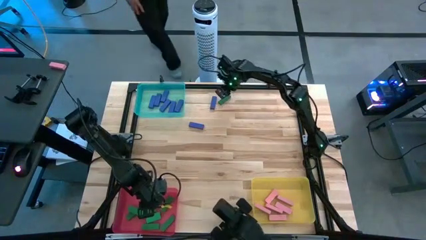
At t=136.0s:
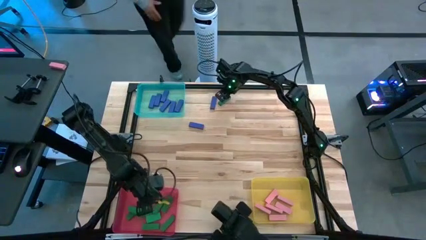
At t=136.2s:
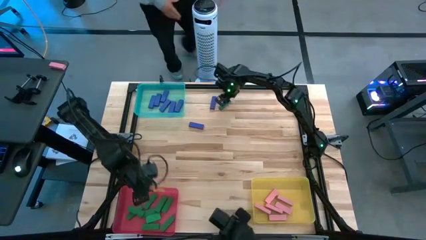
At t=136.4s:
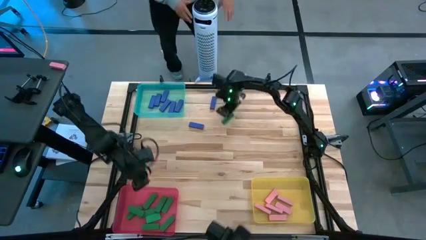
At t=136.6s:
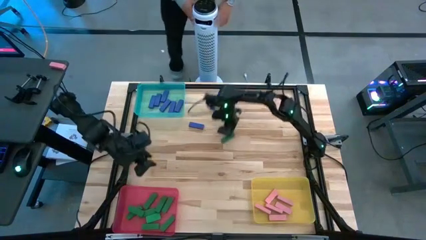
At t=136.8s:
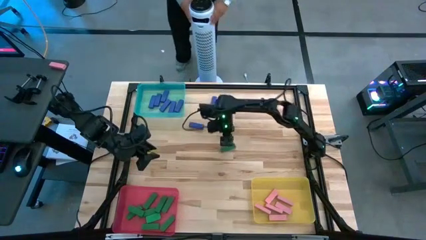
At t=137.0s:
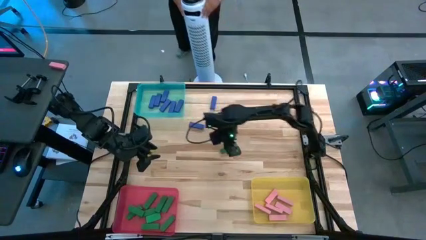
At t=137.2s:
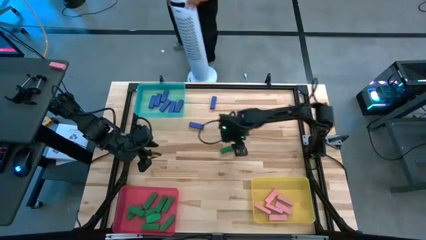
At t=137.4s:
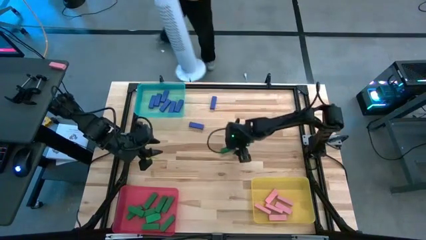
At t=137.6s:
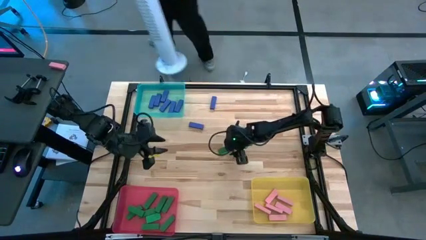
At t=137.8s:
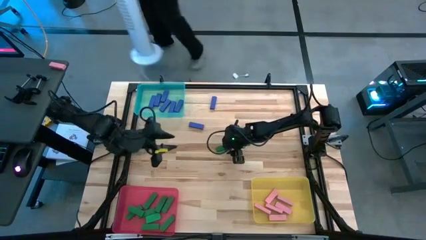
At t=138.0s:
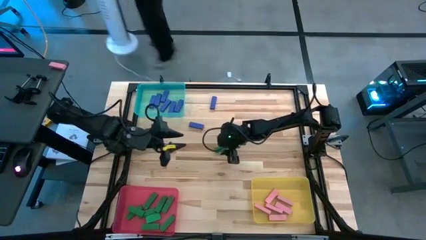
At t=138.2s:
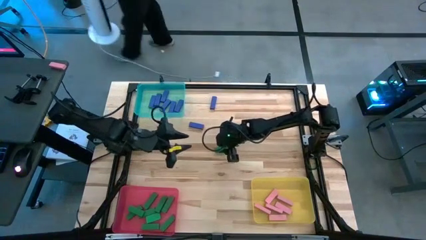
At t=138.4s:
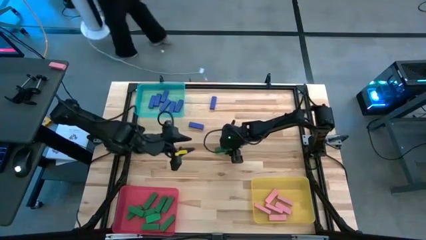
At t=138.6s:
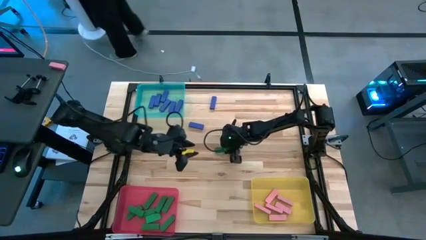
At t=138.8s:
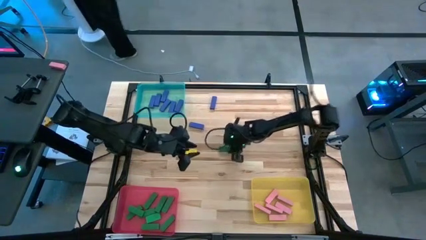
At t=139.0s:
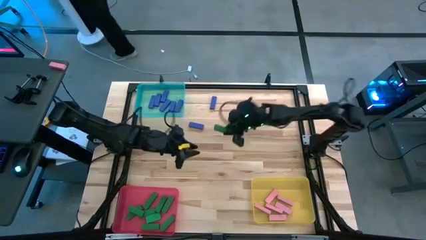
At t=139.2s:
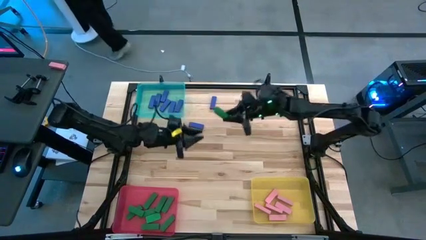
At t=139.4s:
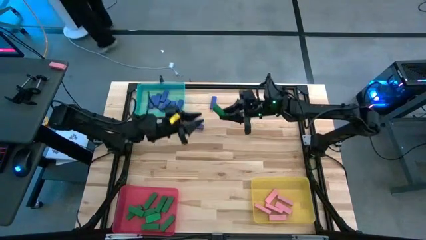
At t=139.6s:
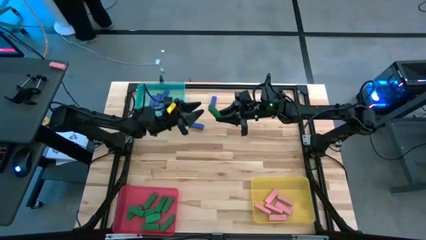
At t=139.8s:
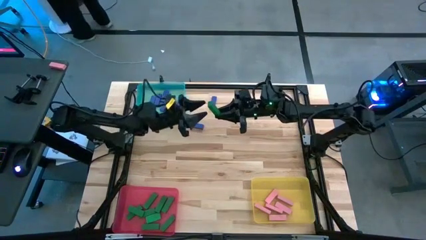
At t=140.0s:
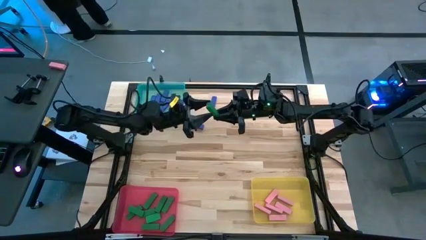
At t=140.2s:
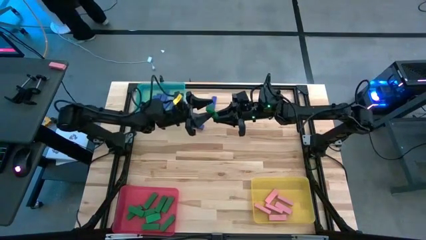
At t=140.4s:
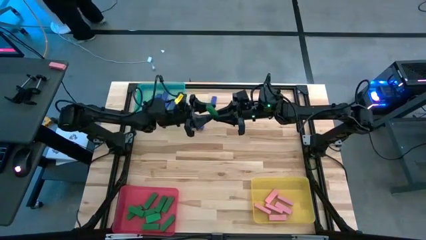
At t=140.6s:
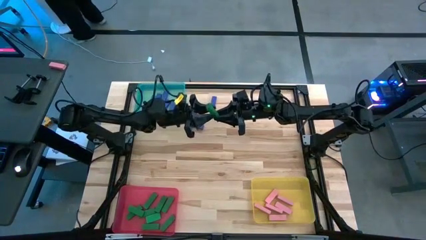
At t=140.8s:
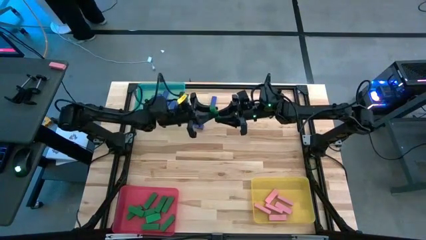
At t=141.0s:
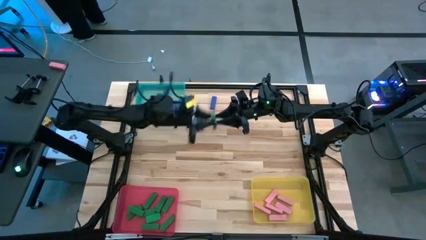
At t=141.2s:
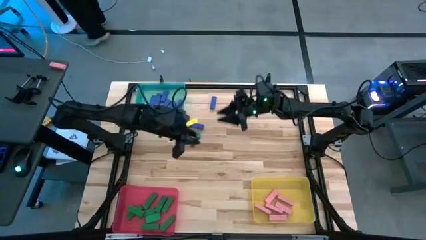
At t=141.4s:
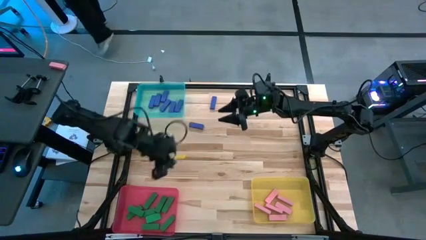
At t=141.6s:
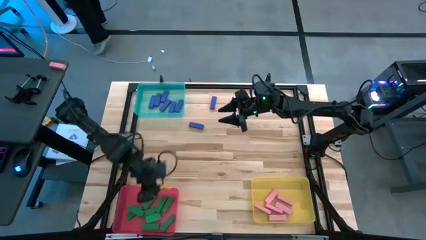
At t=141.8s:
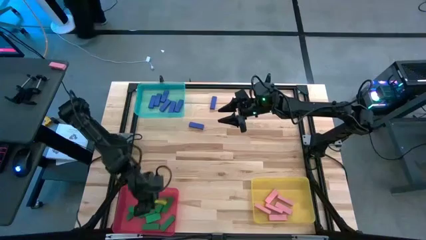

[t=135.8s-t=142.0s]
Task: Sort blocks
Put the green block into the red bin

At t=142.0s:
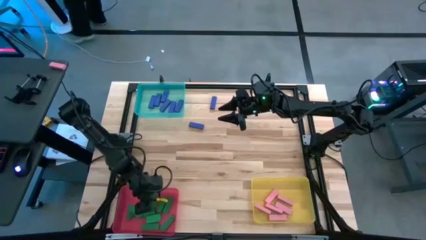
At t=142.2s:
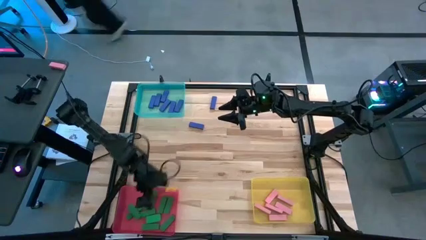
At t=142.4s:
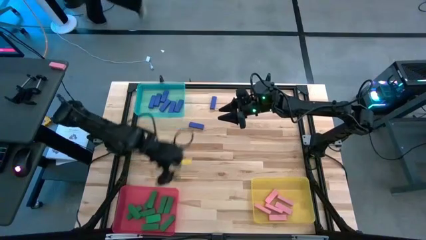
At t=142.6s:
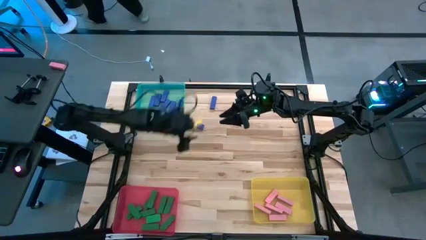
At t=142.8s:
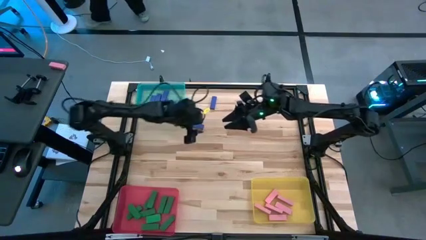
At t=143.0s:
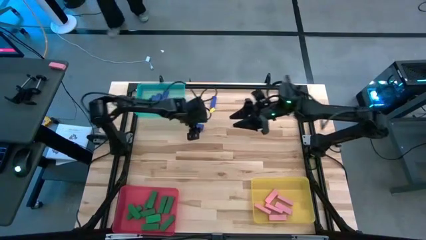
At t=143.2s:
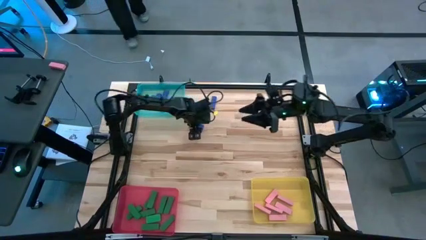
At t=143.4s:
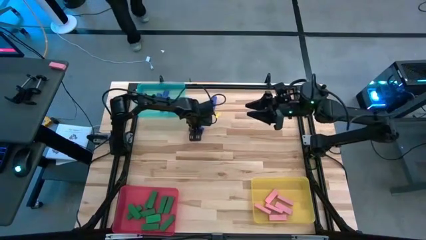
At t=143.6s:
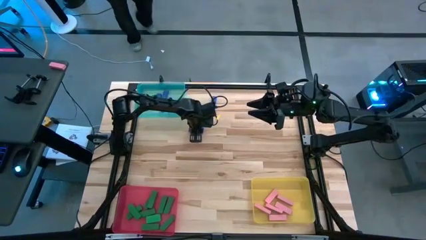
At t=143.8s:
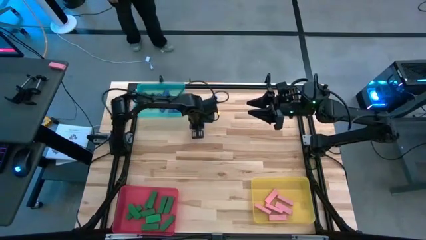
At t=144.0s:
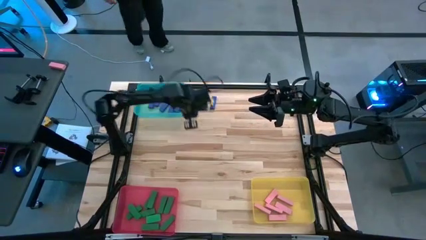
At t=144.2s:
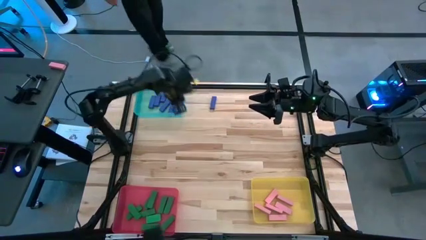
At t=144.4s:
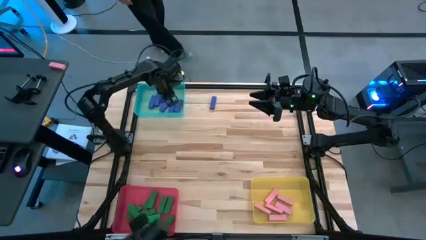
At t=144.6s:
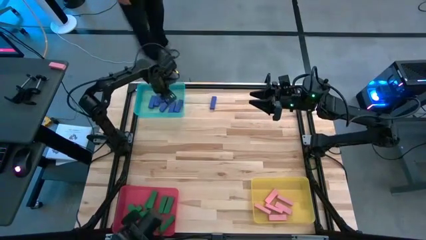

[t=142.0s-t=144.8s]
Put the blue block into the blue bin

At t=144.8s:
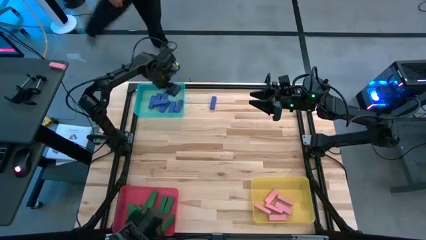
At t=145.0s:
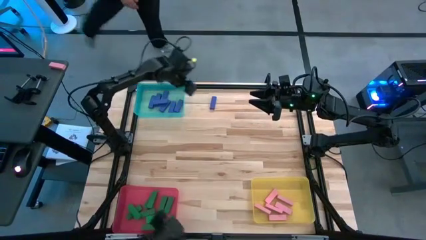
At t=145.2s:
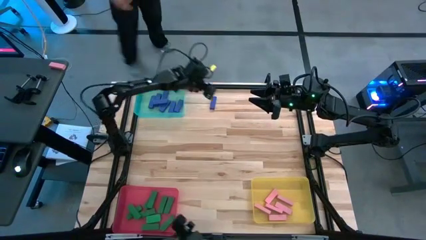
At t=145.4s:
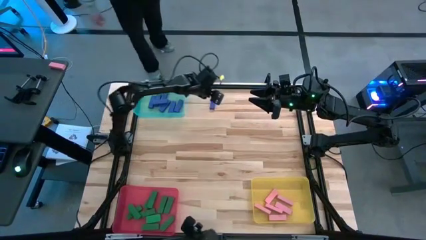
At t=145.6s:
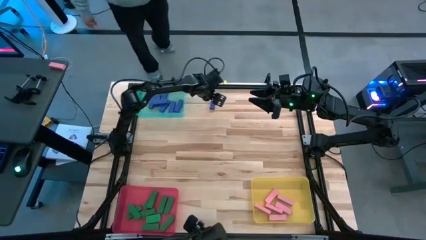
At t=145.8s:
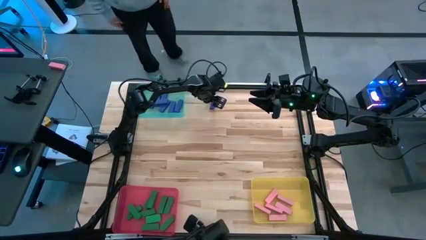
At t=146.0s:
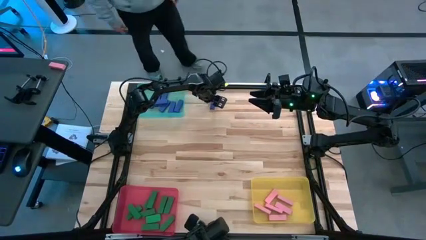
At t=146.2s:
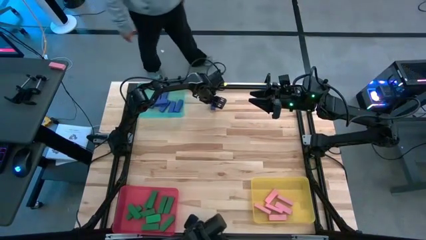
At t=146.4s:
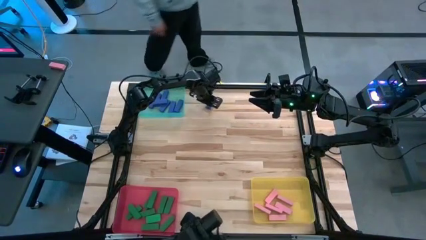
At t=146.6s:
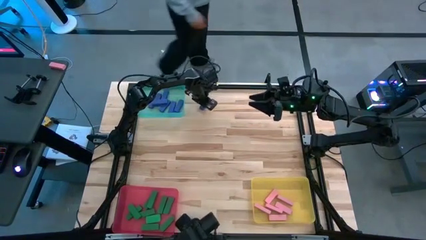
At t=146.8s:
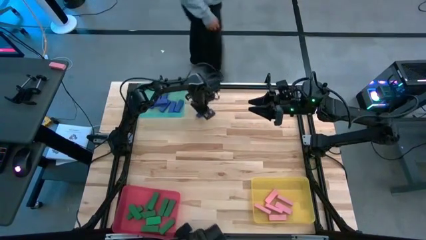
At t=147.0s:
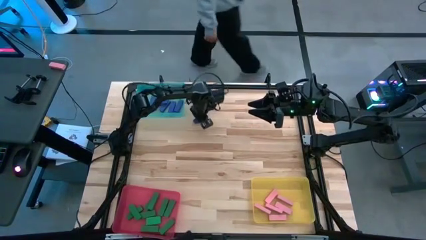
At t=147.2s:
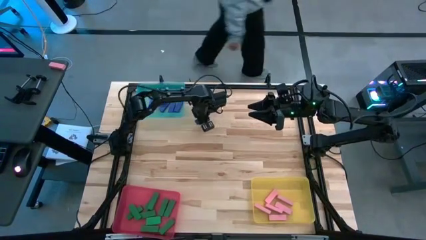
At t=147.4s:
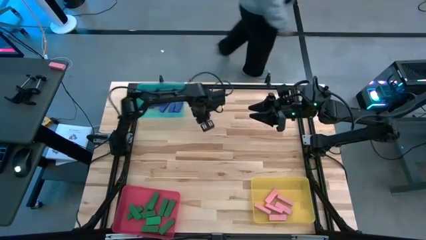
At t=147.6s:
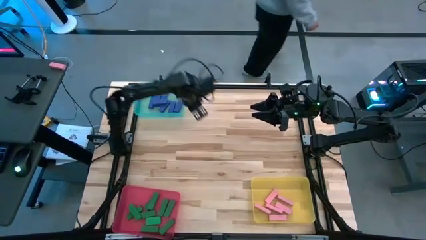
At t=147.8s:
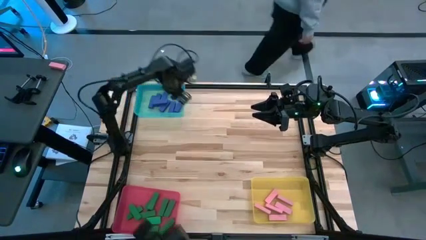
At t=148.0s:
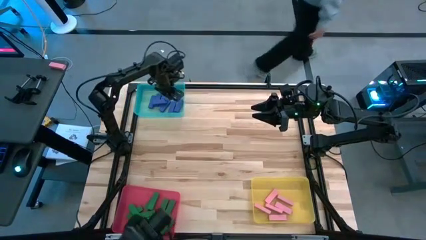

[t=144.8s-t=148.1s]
Put the blue block into the blue bin
